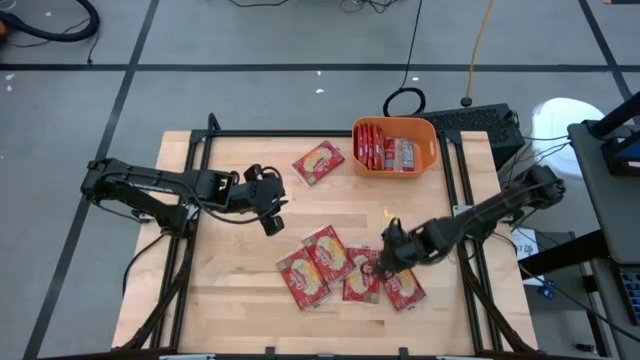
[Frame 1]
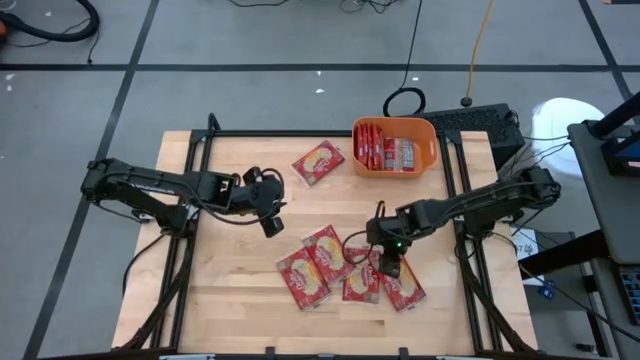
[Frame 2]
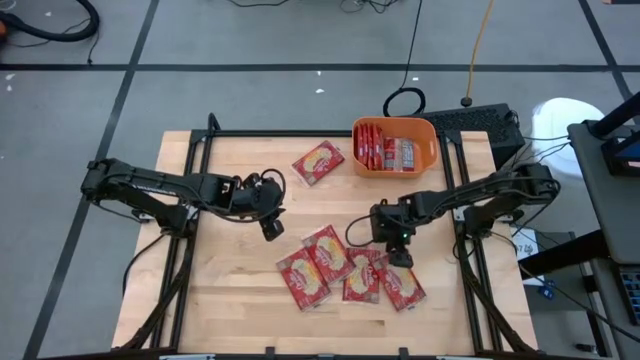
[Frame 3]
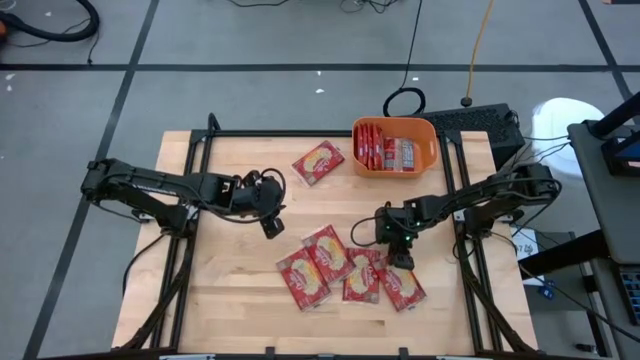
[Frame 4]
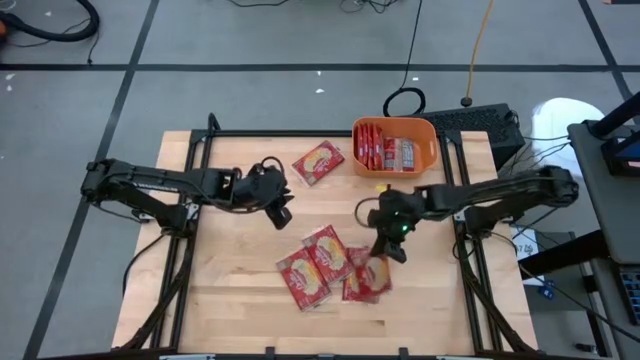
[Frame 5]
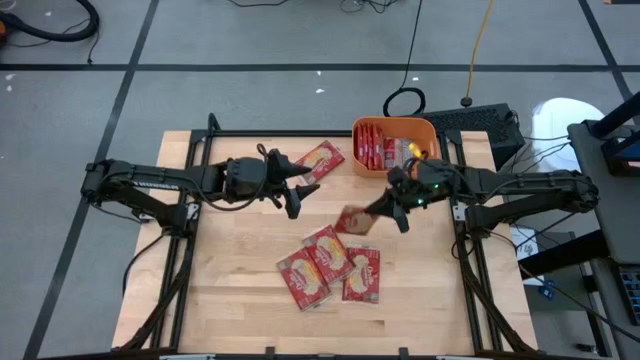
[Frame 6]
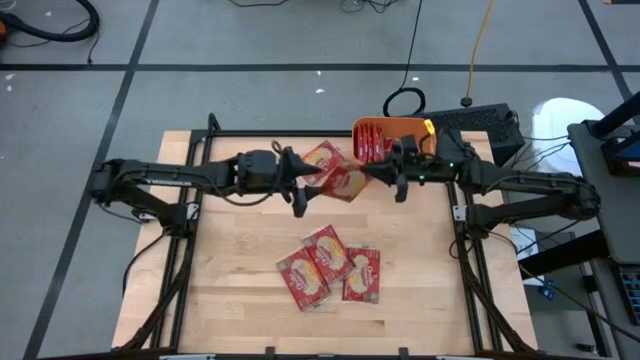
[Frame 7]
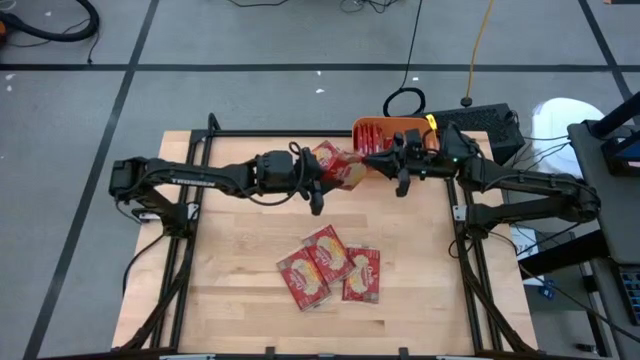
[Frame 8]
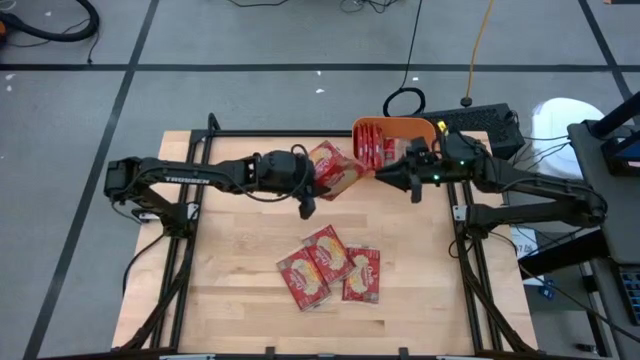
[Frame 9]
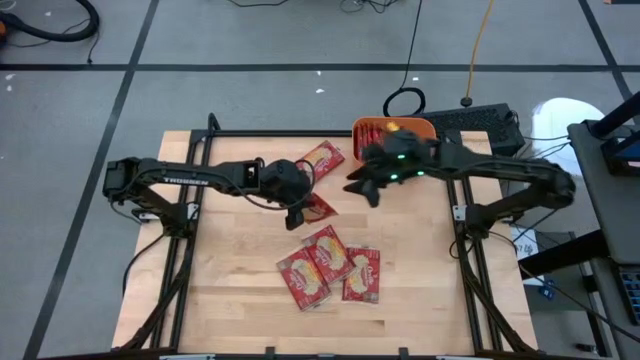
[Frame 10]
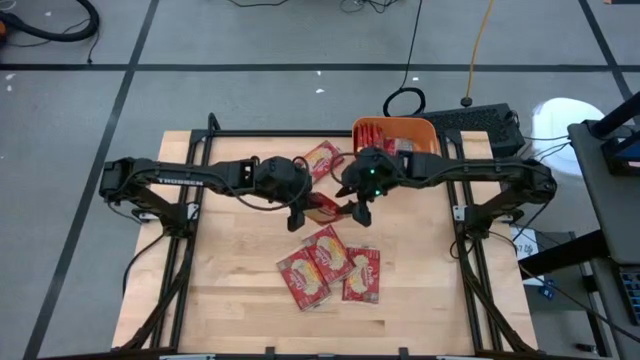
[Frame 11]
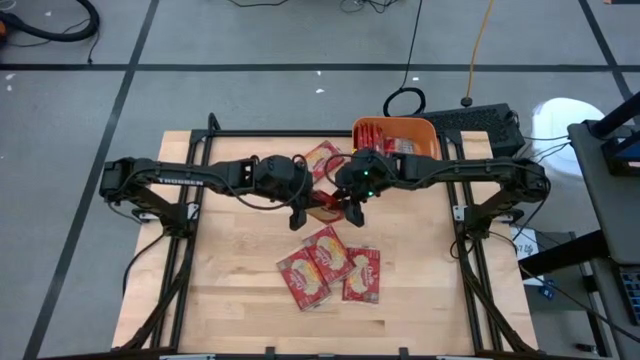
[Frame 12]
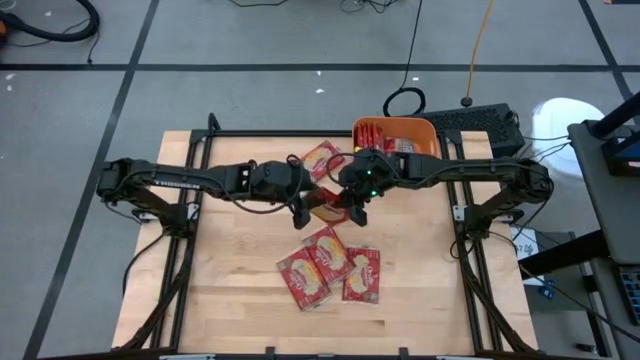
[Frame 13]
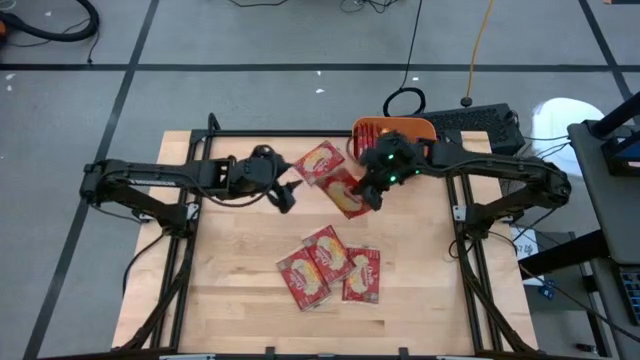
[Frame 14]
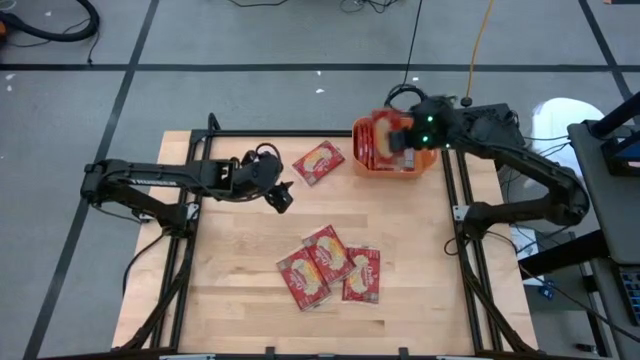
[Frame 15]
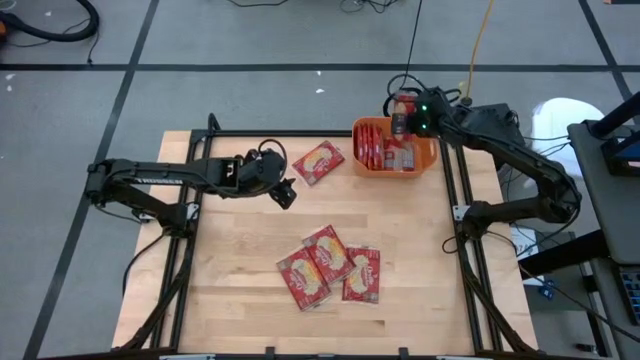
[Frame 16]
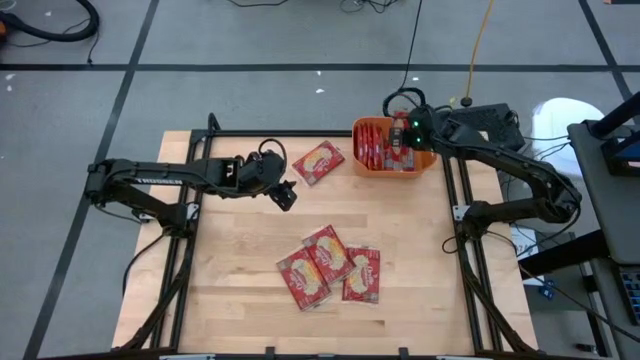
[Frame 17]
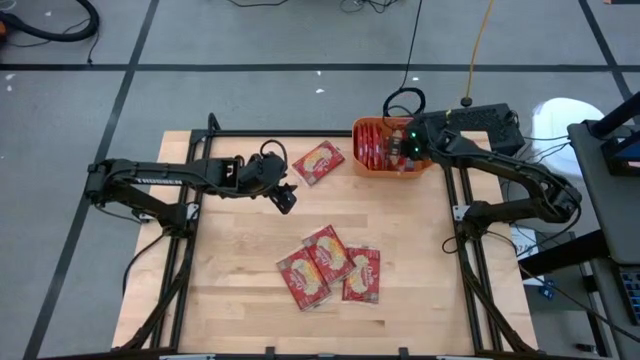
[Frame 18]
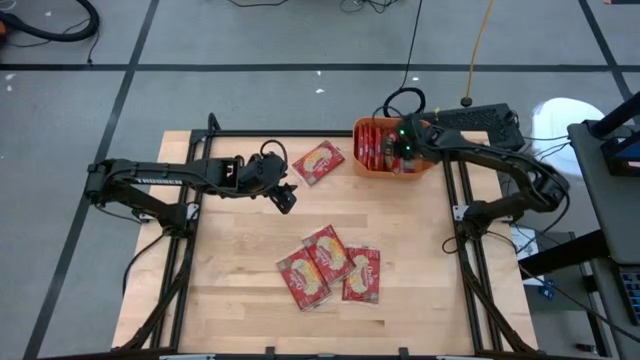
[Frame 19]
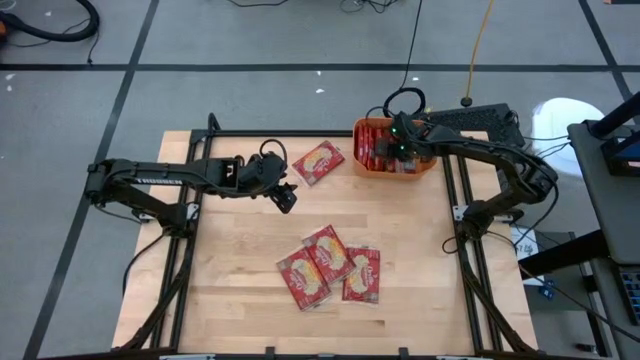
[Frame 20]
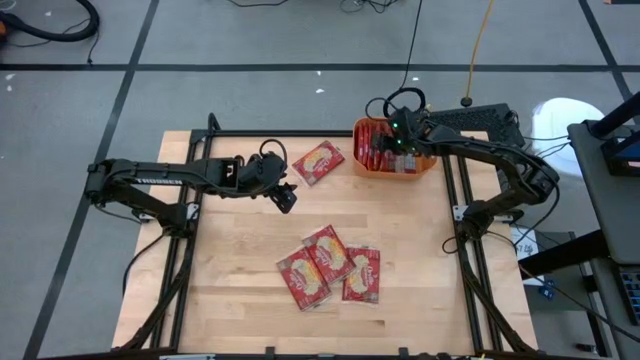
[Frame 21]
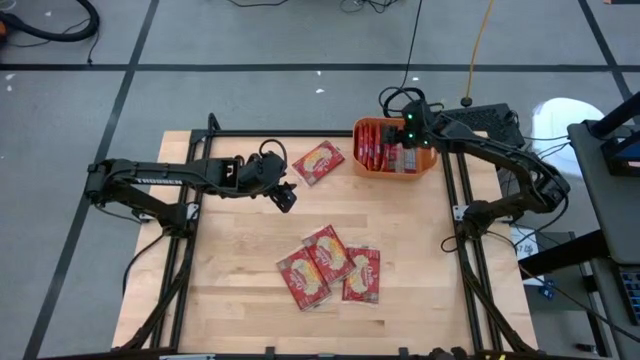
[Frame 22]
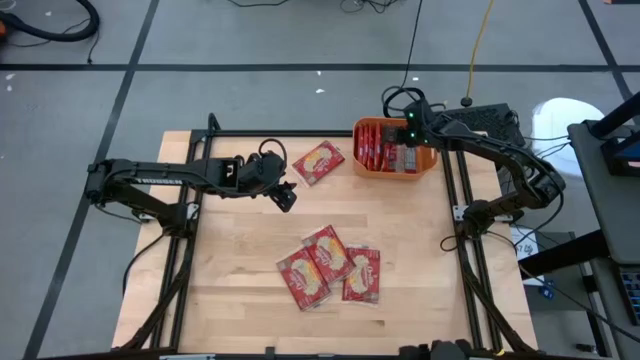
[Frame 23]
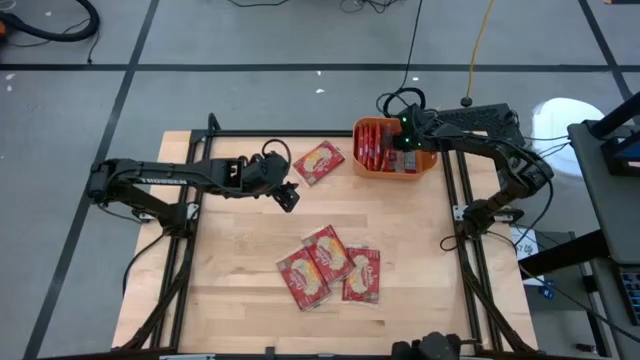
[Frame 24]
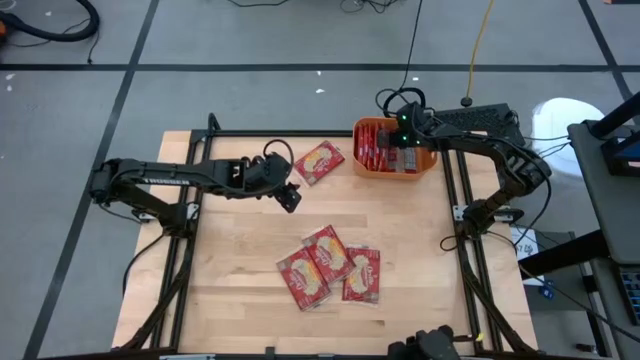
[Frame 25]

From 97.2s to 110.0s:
Task: Sort popcorn bags into baskets
Put the red popcorn bag into the orange bin

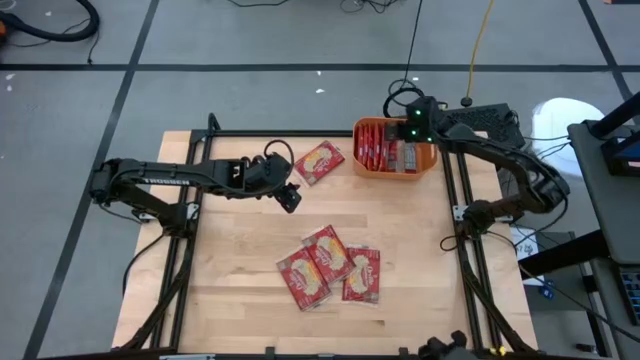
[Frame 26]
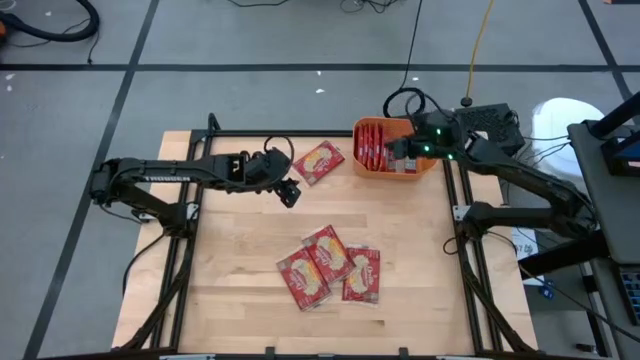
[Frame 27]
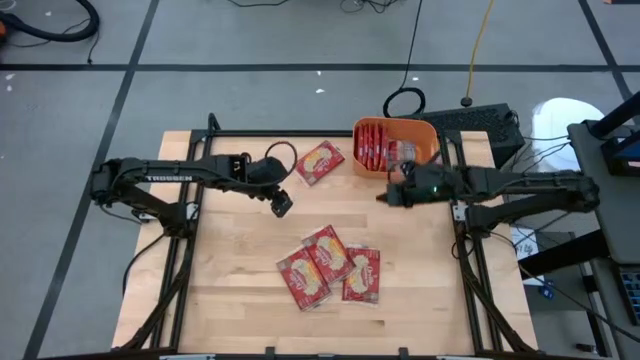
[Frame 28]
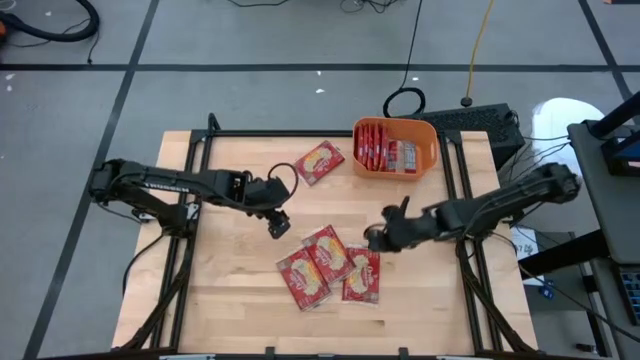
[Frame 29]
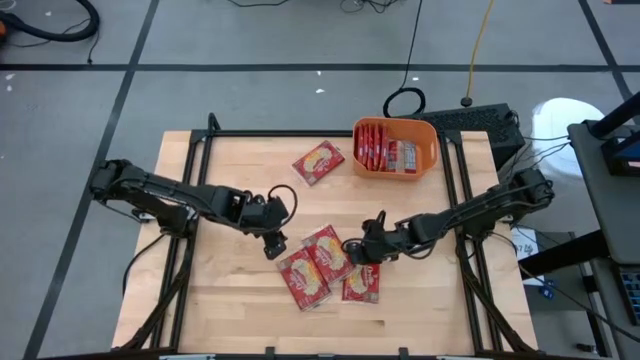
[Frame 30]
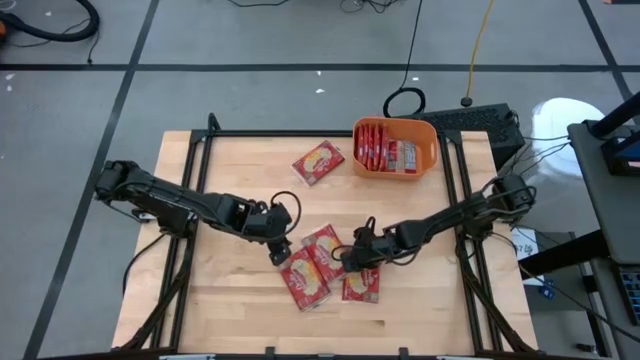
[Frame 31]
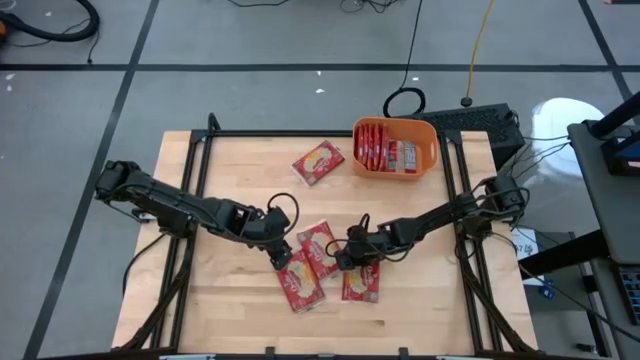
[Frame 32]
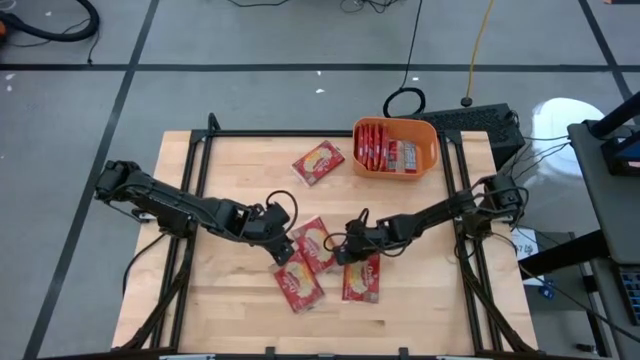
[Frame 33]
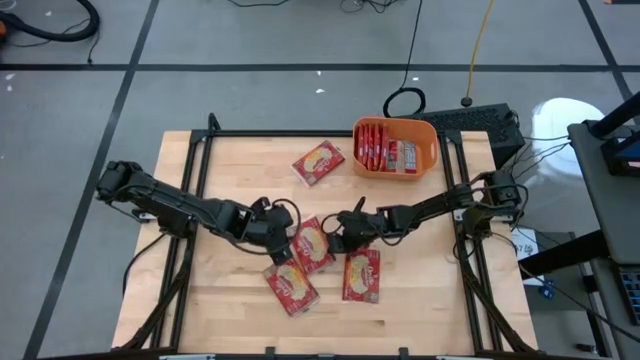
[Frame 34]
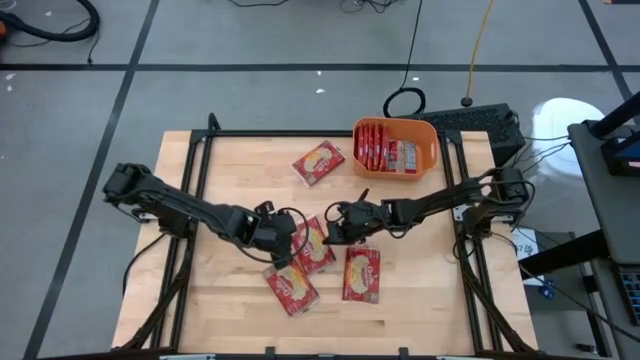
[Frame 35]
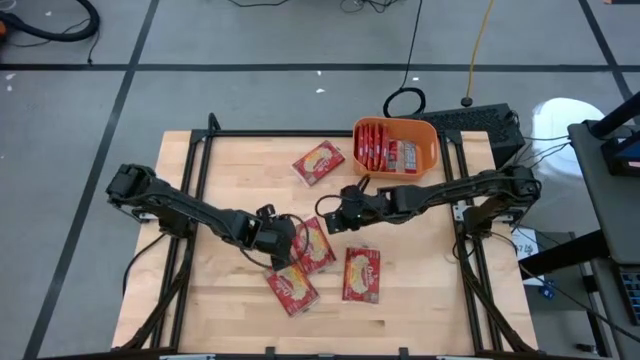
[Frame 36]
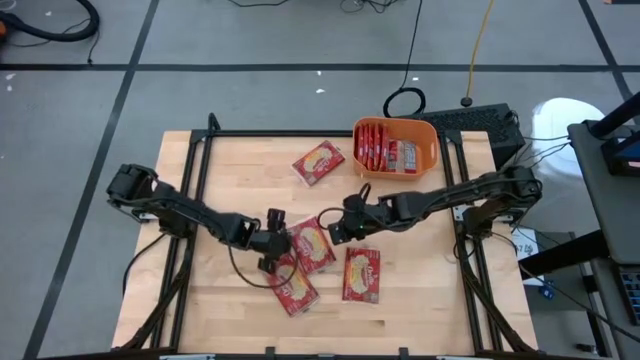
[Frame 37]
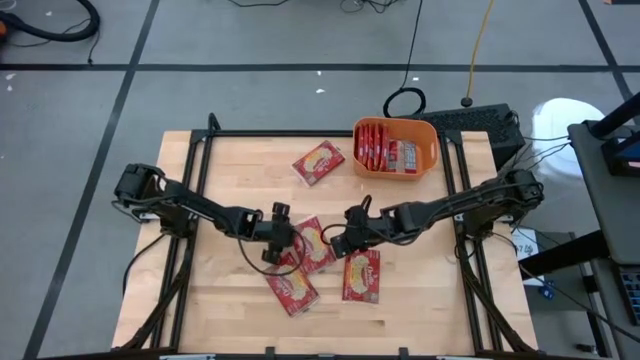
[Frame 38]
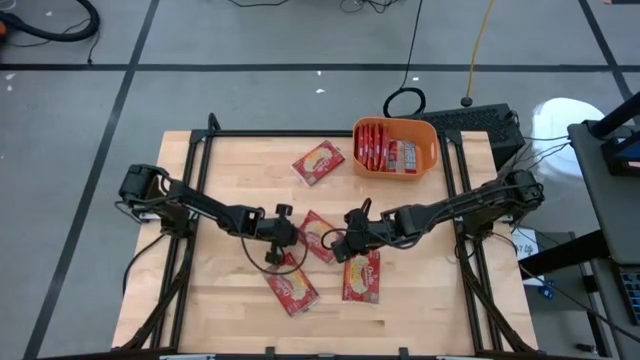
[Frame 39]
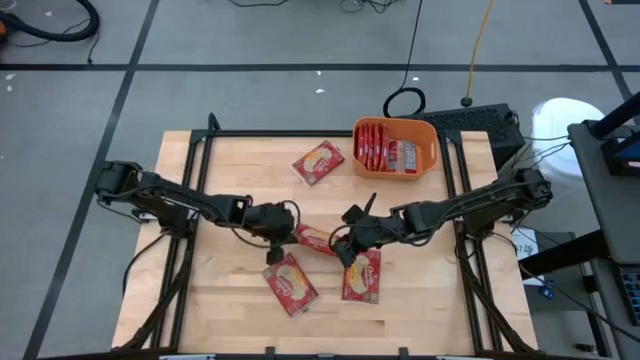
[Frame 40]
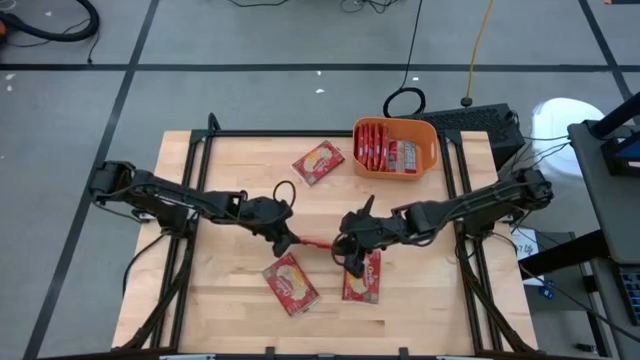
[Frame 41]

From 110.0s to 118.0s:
Put the red popcorn bag into the orange bin

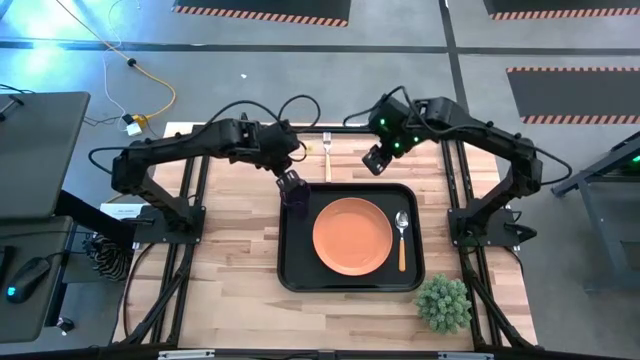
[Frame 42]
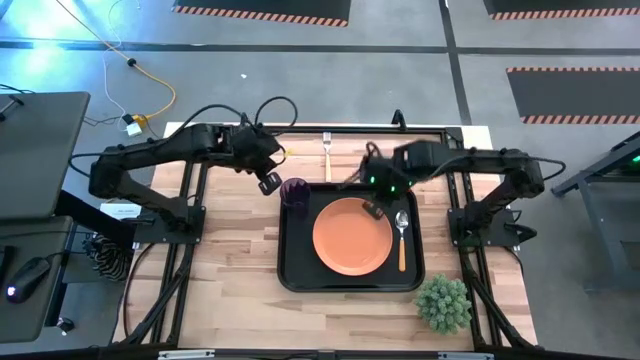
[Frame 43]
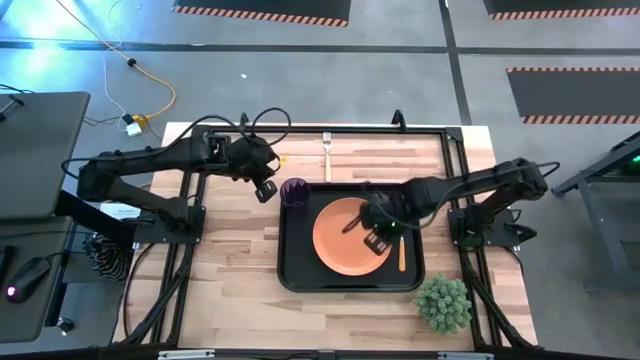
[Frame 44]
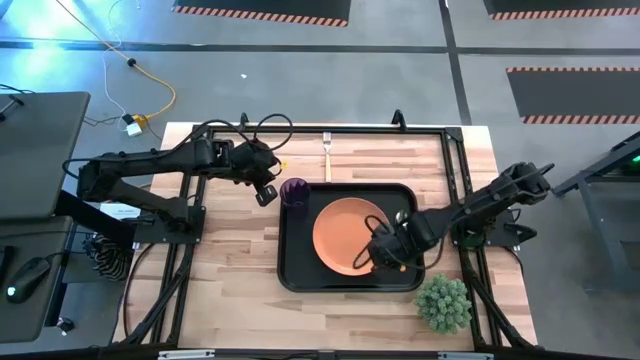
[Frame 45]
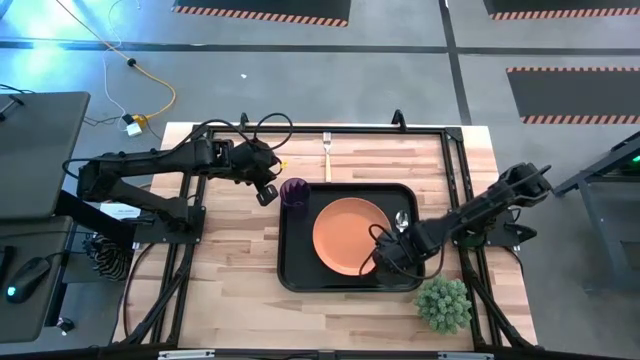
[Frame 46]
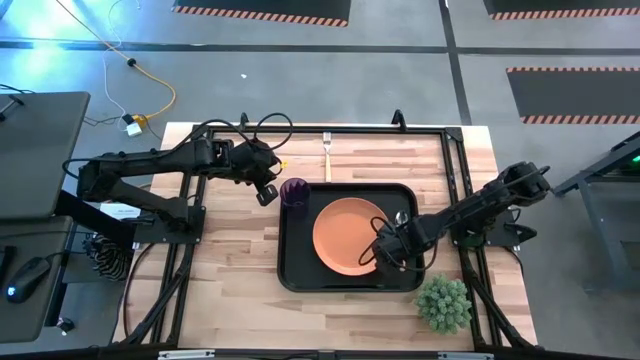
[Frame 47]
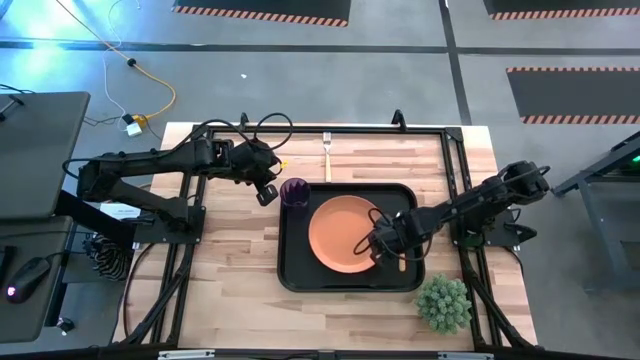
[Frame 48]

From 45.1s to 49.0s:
Task: Pick and place plate/cup/fork/spoon on tray
Adjust the orange plate
